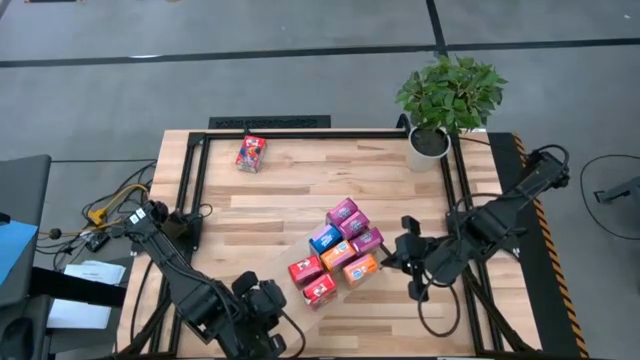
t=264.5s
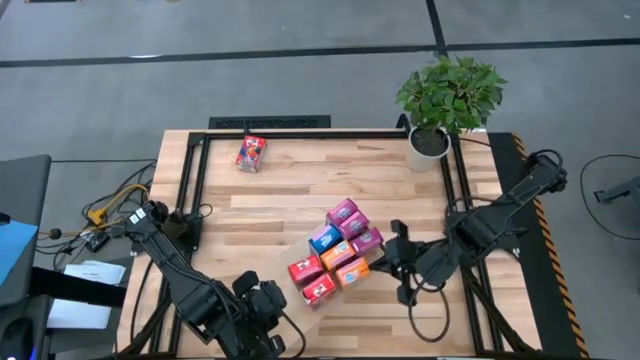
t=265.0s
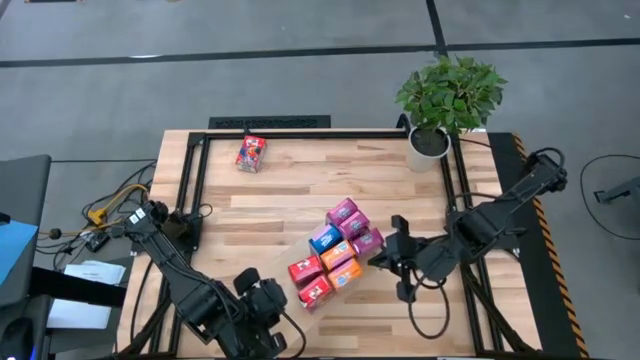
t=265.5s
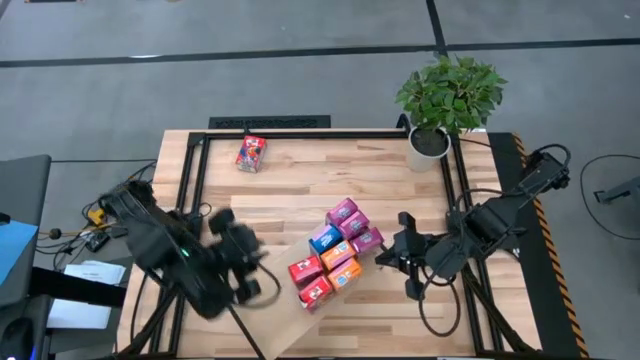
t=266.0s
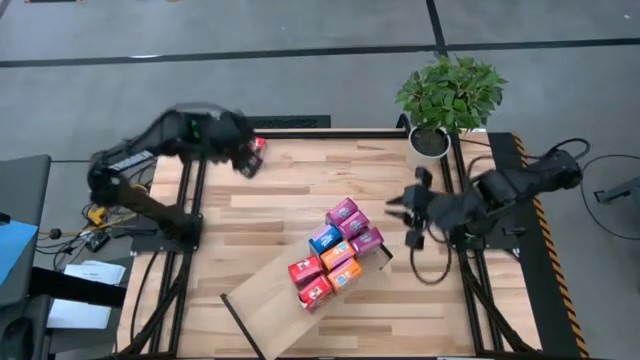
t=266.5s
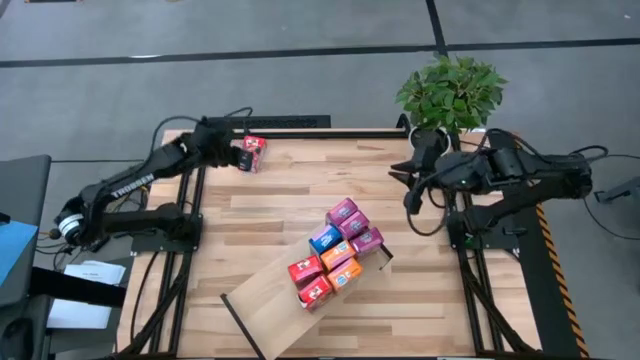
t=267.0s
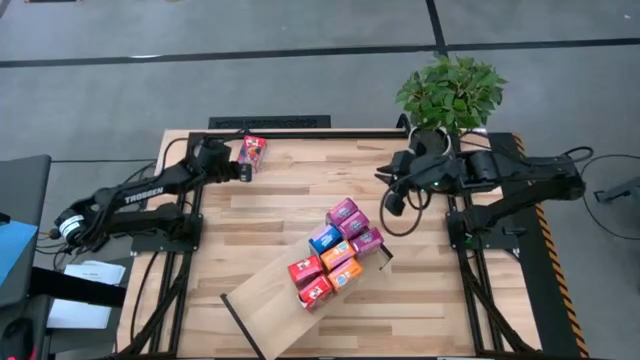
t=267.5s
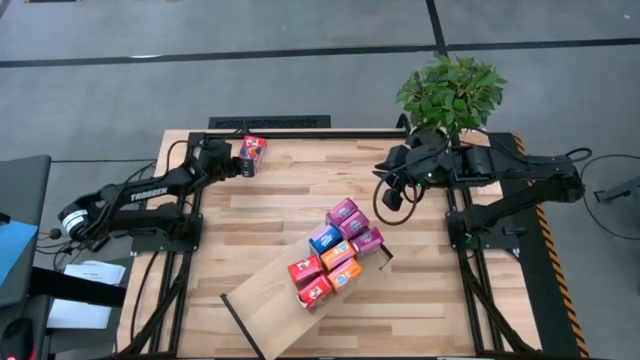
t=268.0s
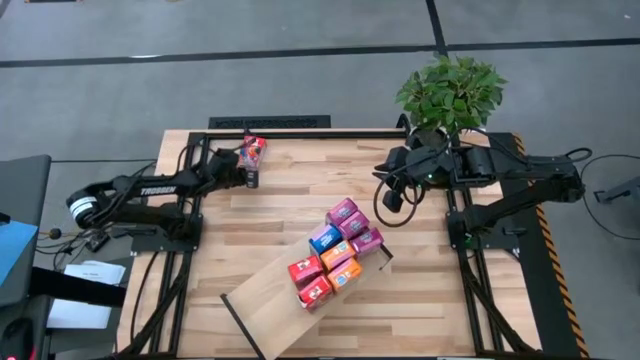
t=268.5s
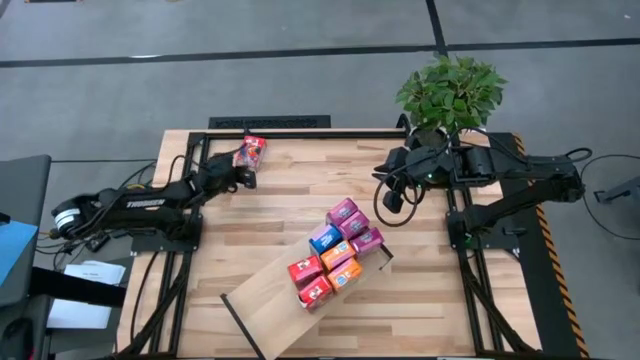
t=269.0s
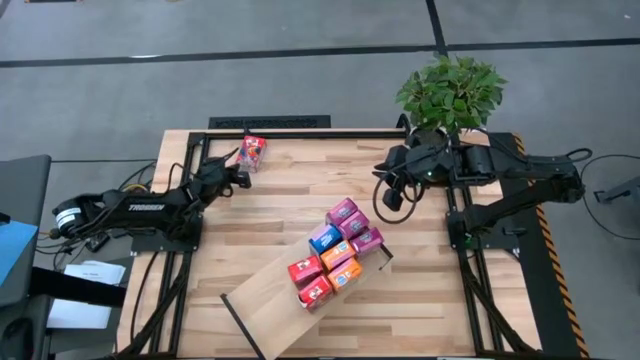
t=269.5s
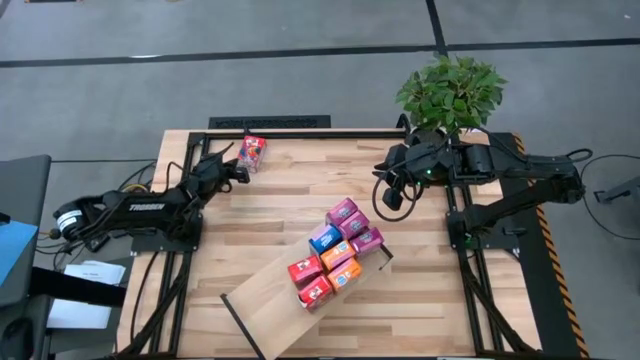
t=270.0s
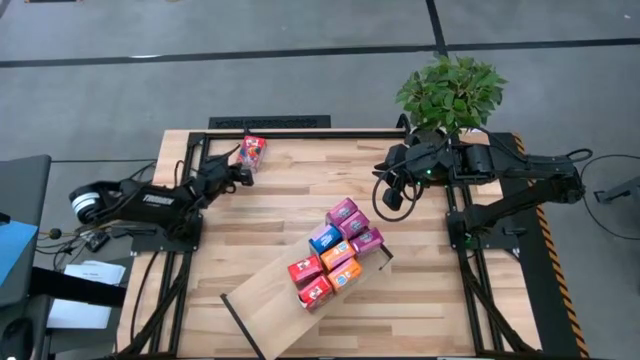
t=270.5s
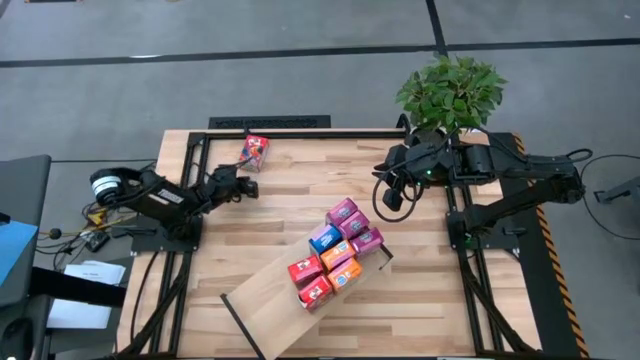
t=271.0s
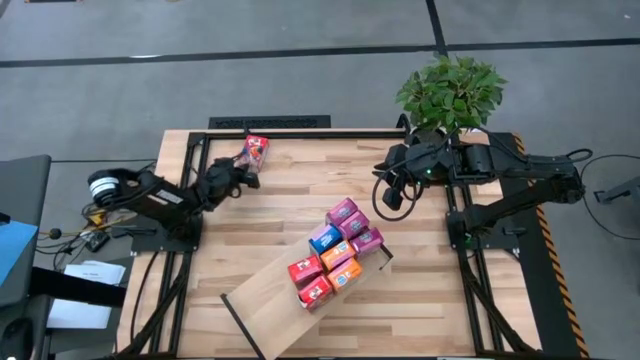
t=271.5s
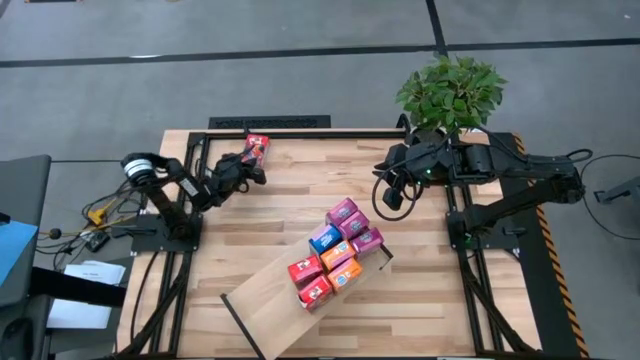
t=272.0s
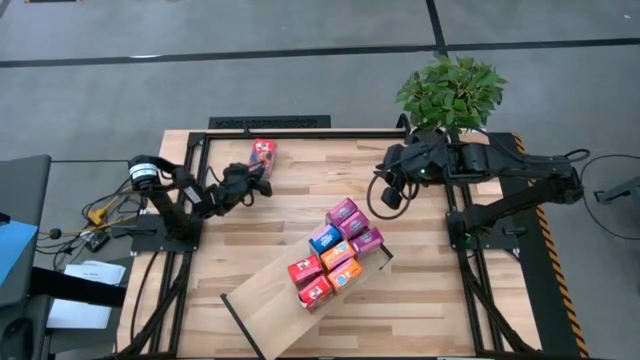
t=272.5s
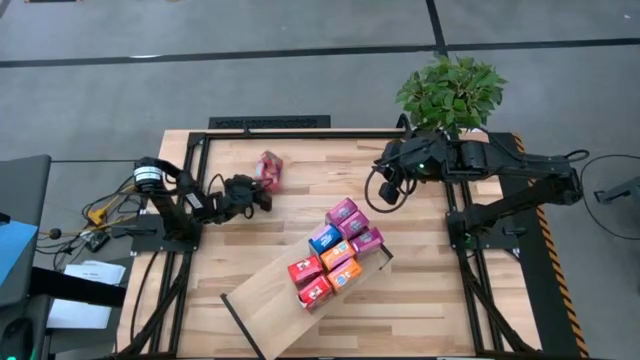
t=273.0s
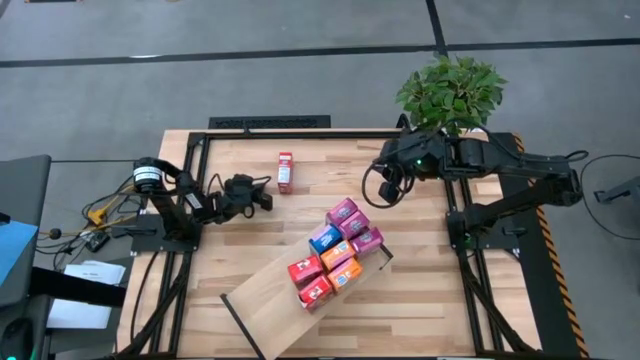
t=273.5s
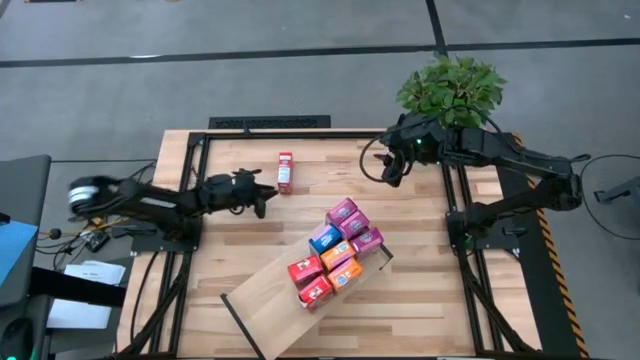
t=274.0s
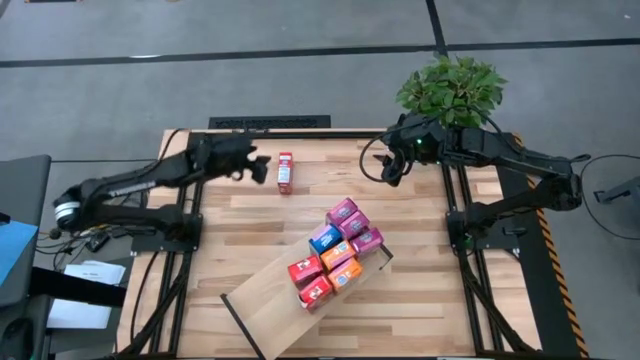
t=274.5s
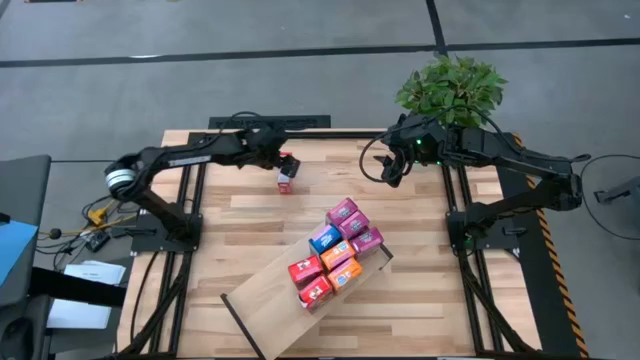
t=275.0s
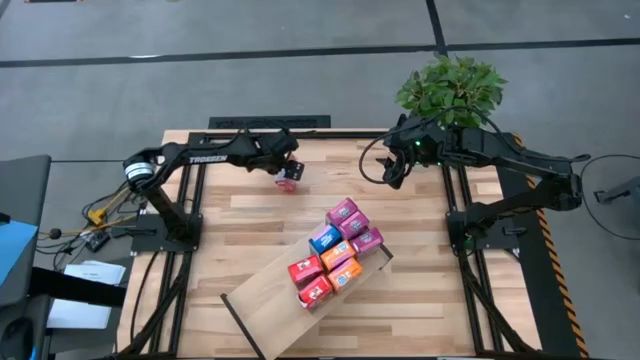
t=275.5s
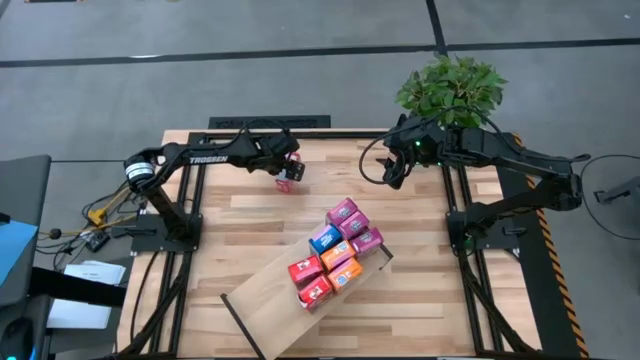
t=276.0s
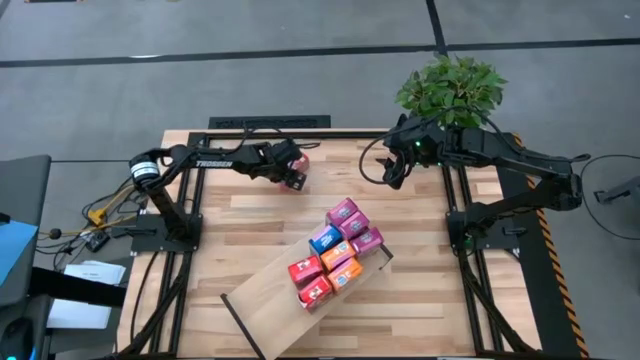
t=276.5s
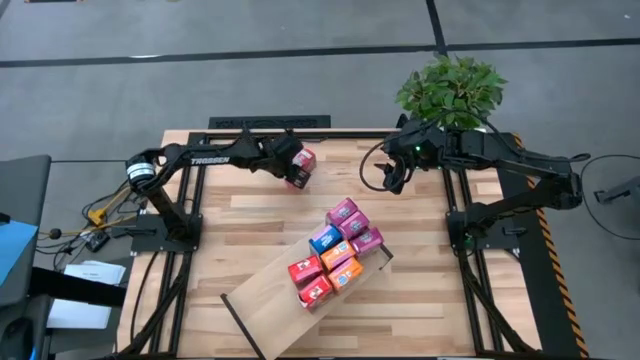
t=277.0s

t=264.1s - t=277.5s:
Task: Stack cereal on shelf
Put the red cereal box onto the shelf

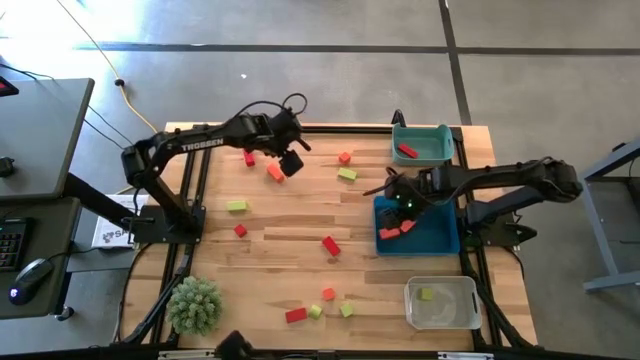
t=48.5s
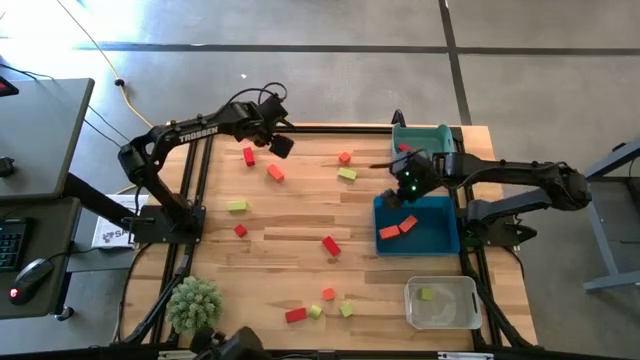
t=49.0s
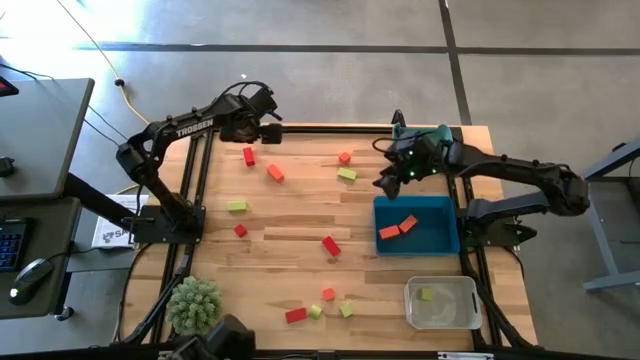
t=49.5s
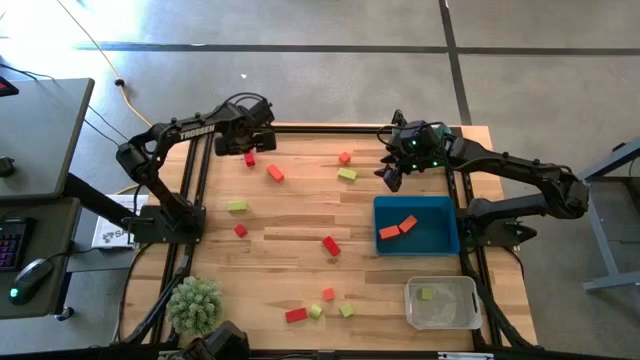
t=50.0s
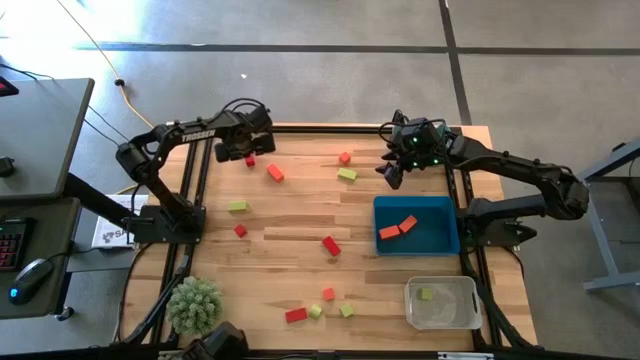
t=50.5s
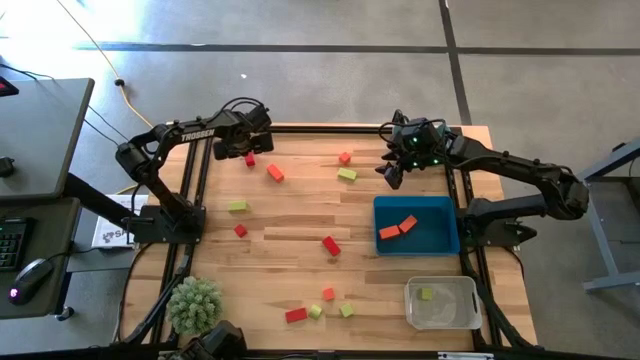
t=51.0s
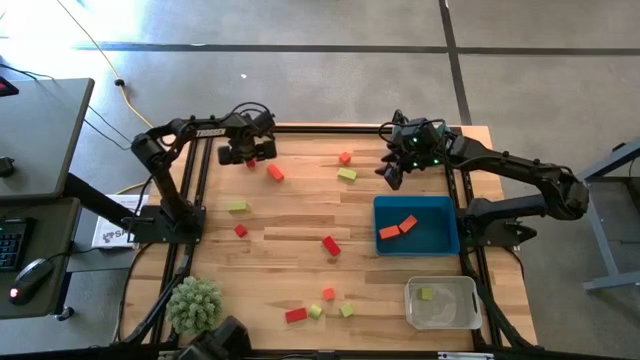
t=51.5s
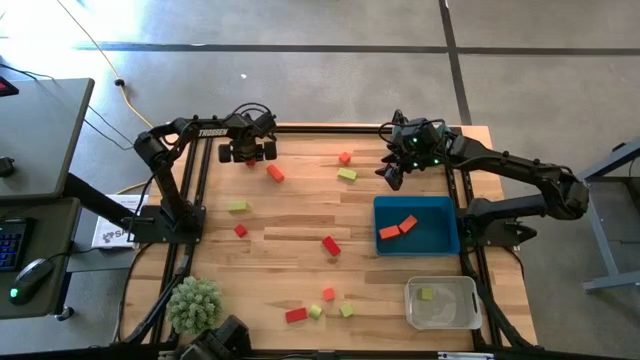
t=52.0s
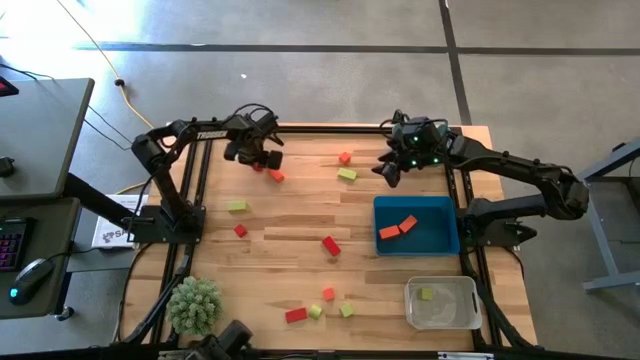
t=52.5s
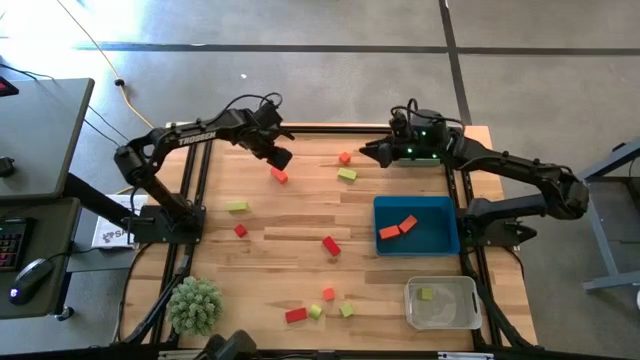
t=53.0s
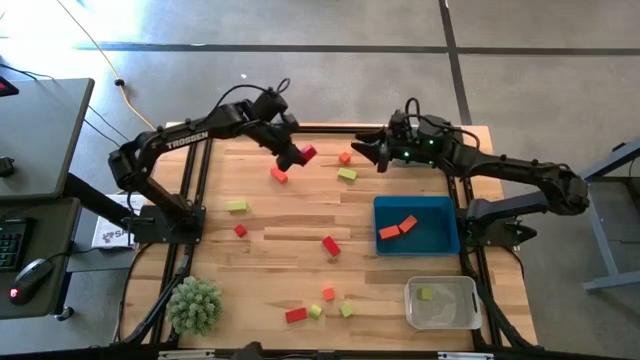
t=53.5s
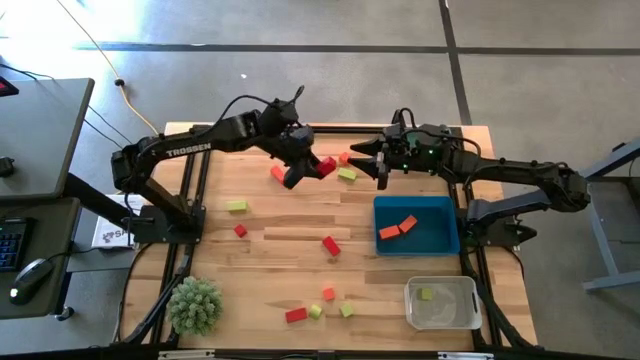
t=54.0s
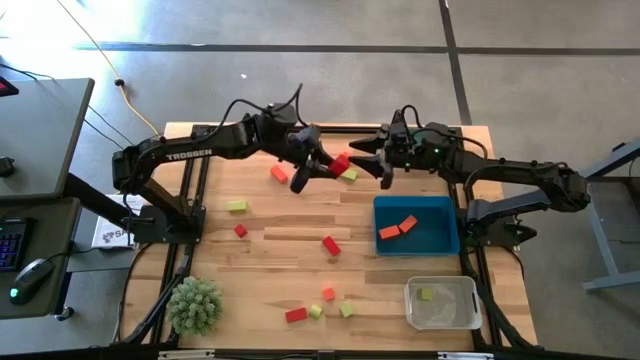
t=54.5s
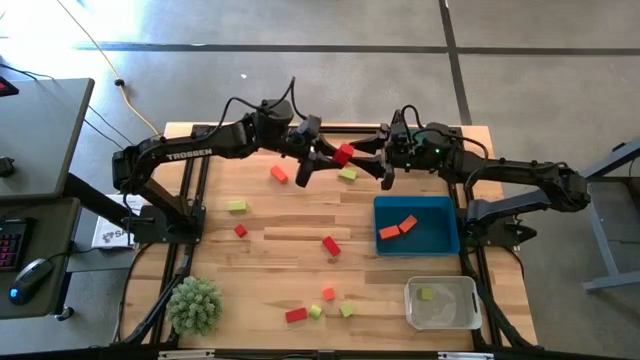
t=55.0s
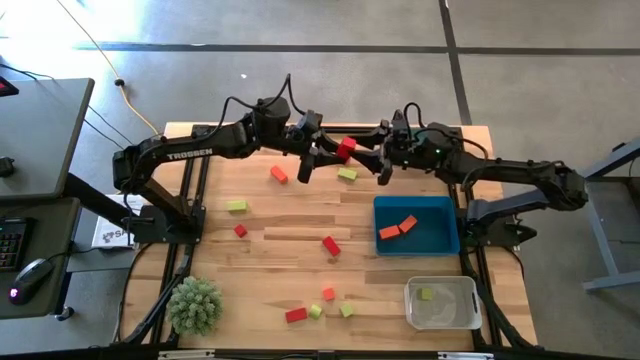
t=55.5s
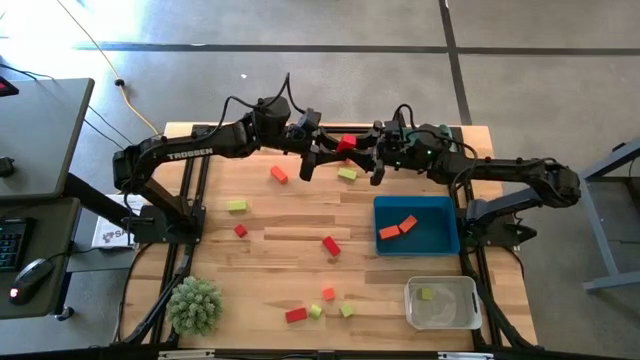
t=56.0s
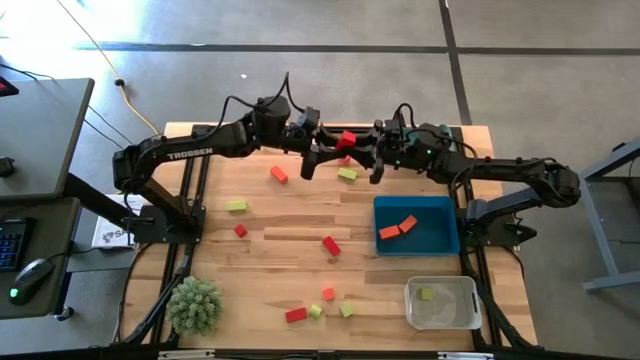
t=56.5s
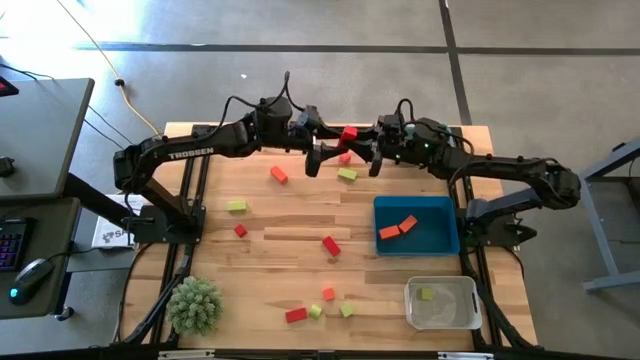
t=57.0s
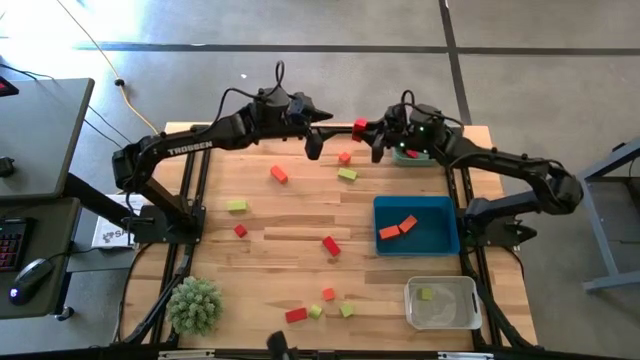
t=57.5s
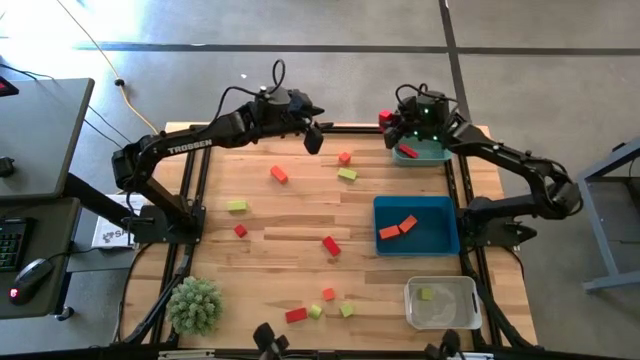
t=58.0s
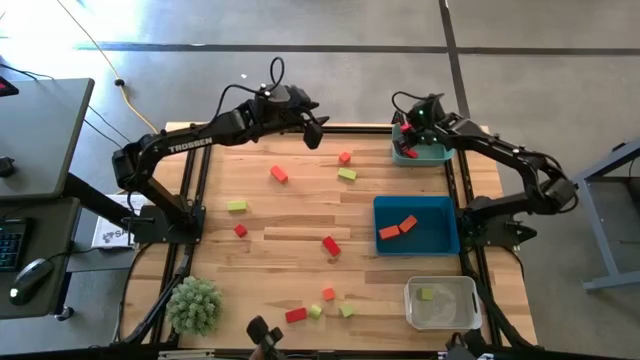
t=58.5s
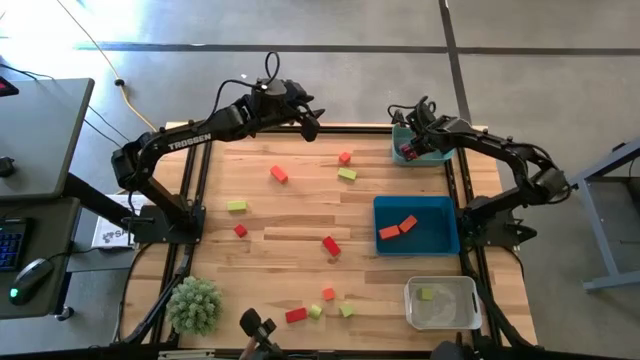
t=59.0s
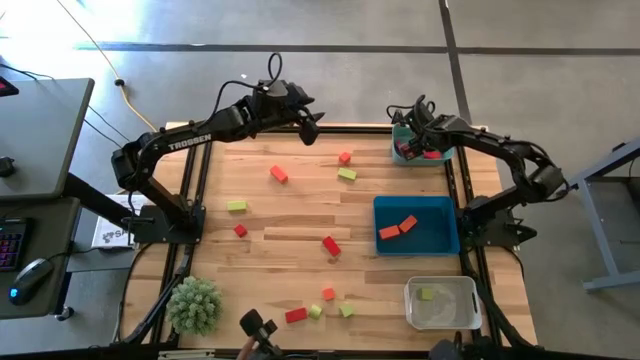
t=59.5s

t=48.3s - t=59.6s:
Task: Sort & place blocks by color
Put the red wooden block into the green bin
